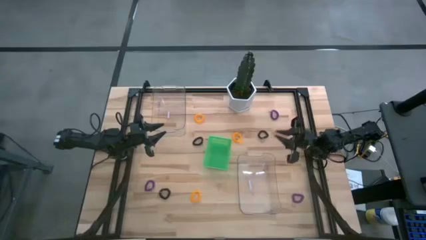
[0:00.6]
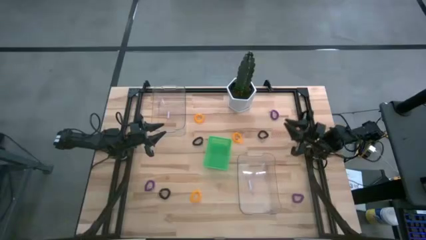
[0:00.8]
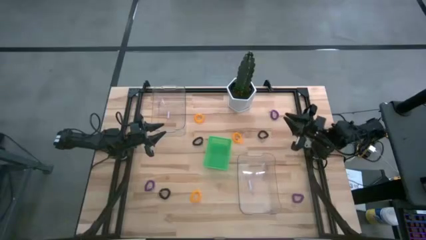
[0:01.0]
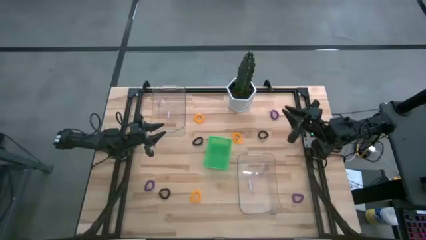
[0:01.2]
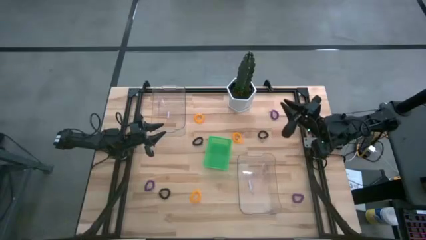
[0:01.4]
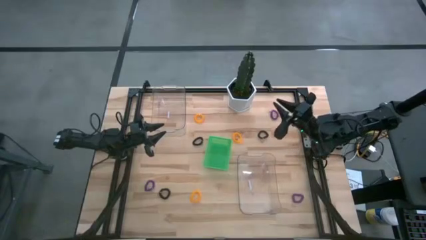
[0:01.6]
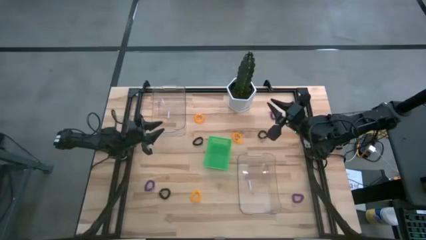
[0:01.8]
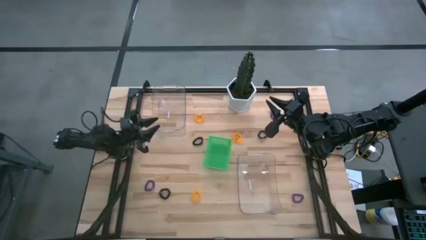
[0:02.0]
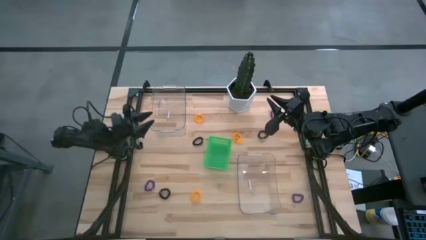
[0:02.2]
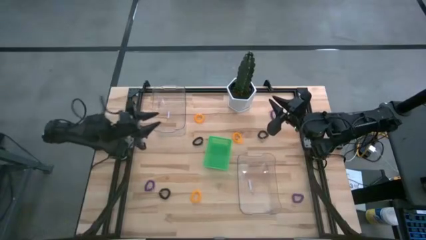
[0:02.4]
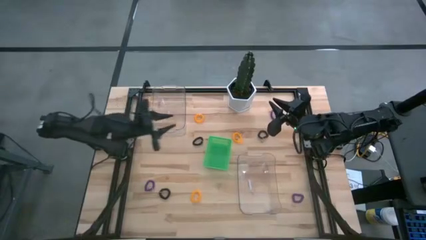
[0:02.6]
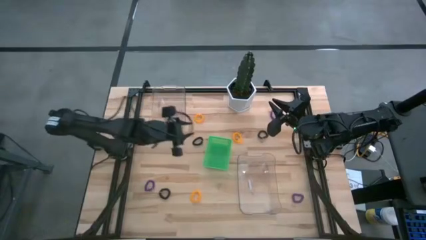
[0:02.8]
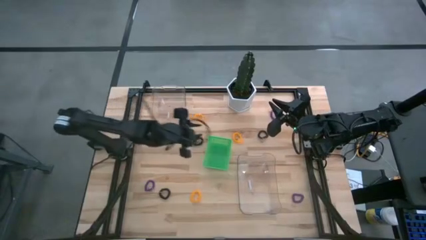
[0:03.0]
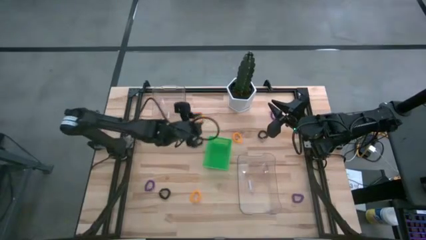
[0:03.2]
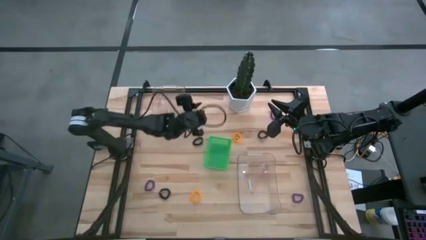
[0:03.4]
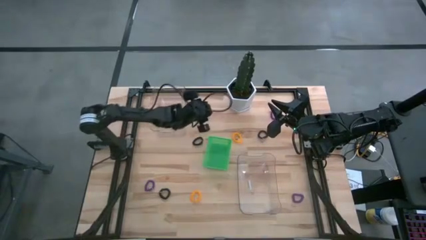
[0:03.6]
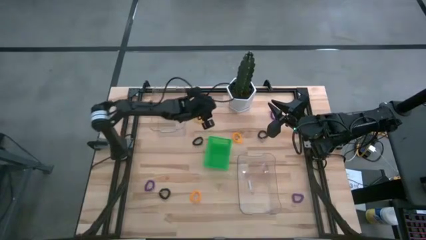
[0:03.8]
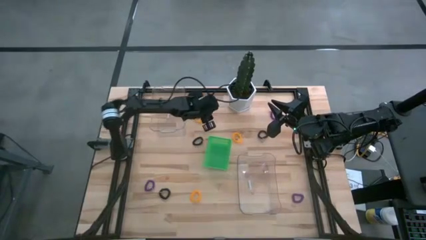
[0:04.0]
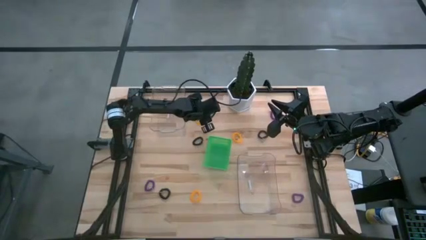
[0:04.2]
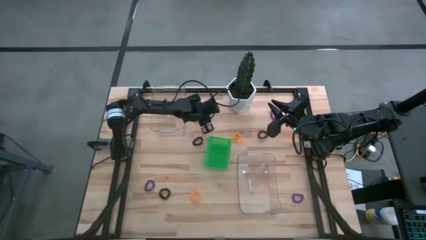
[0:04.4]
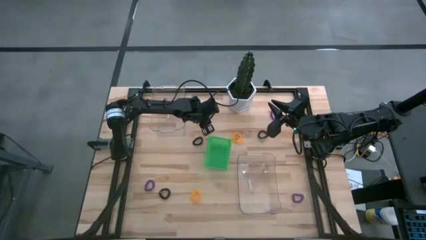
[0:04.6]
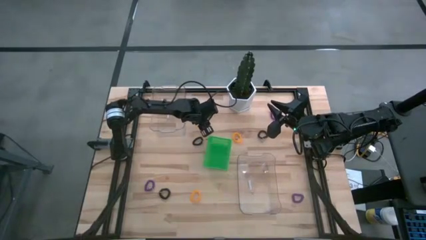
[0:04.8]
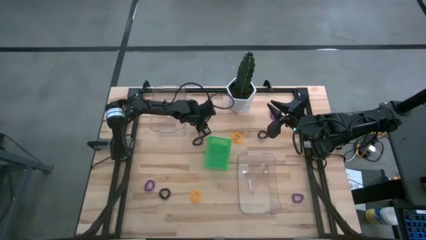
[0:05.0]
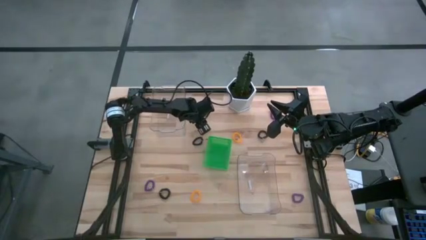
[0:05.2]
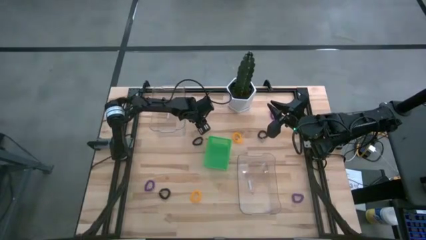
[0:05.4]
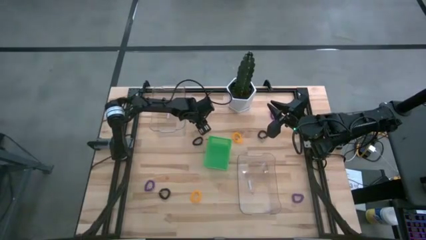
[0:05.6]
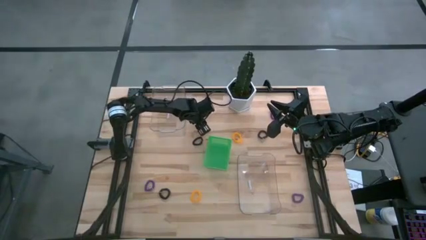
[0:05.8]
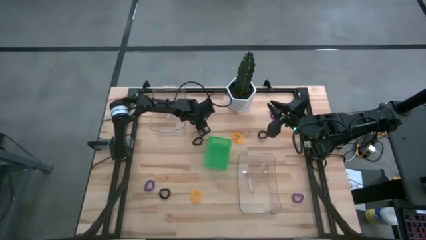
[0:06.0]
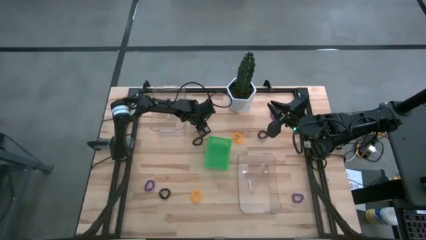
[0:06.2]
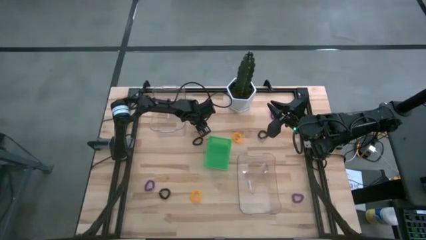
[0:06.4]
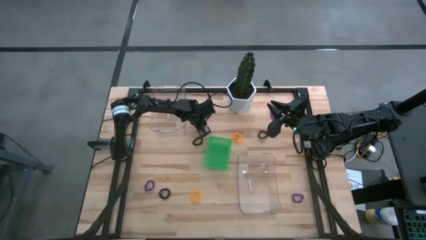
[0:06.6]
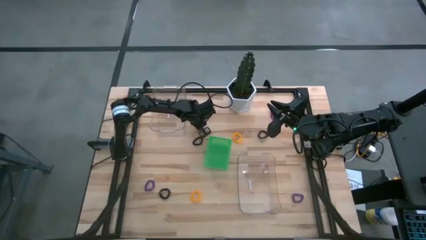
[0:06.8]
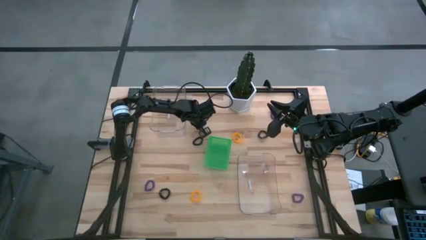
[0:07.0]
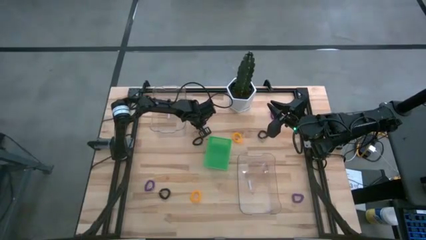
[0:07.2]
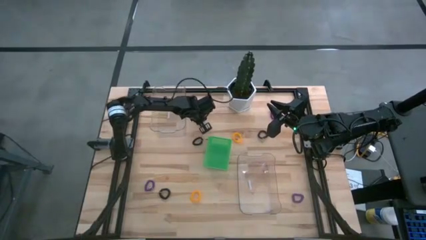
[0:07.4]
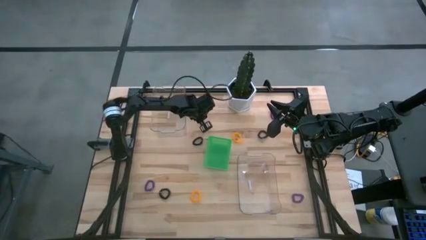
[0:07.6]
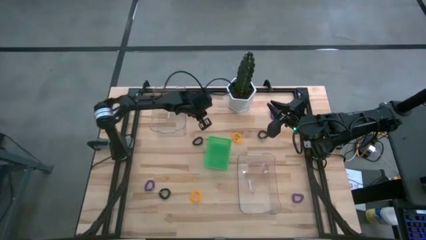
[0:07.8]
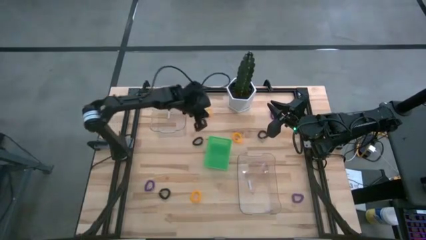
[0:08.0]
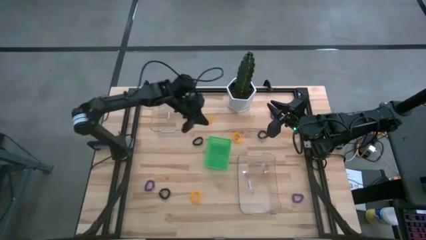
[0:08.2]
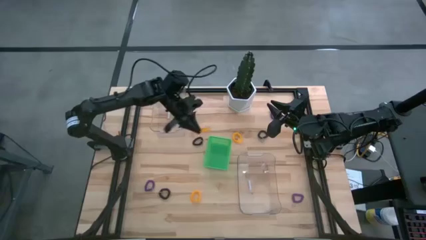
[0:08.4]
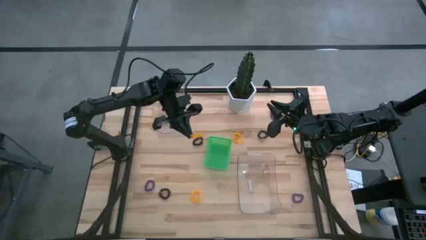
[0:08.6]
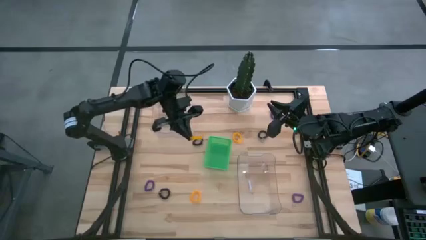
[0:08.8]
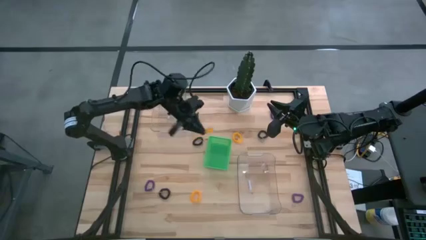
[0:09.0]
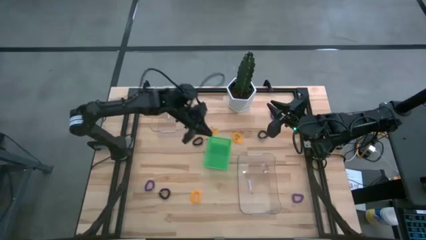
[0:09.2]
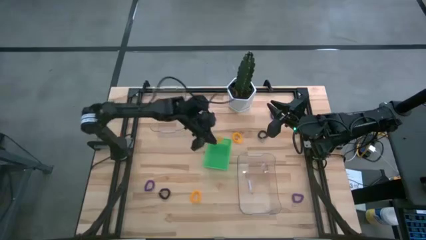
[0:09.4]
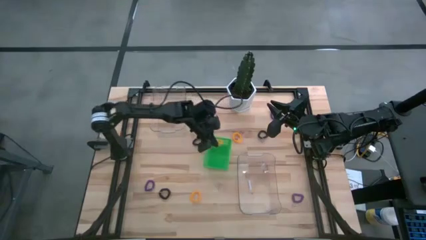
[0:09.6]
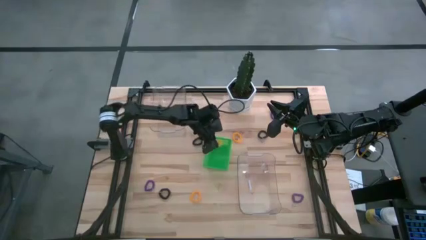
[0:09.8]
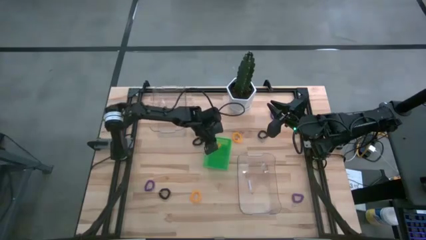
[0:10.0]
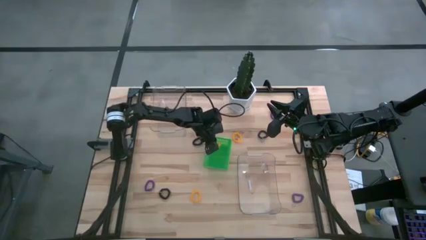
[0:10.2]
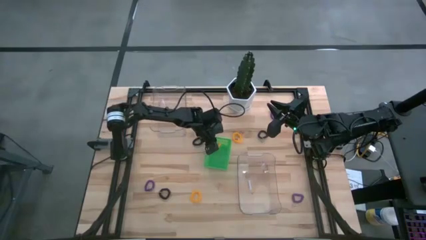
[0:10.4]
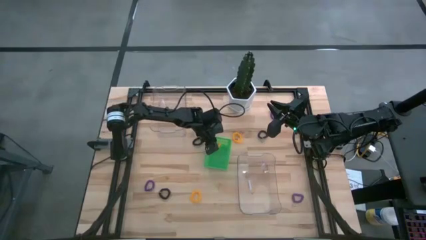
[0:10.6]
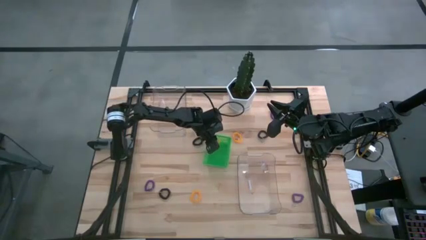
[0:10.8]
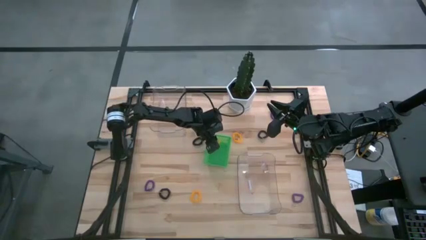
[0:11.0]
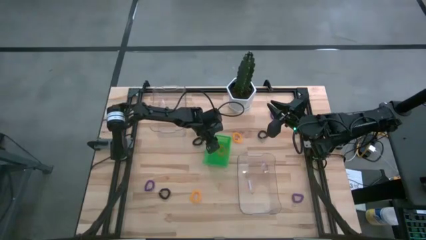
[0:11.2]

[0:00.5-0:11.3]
Task: Sort spring keychains
Put the top left yellow spring keychain into the green basket
